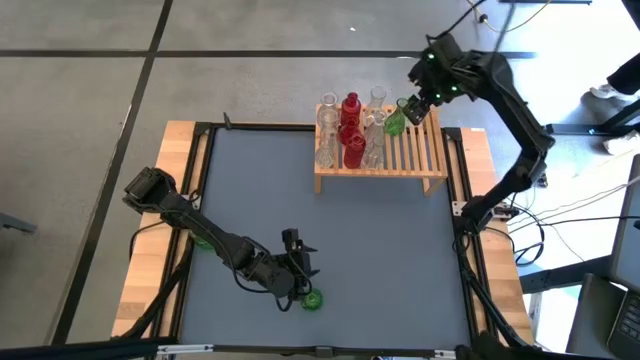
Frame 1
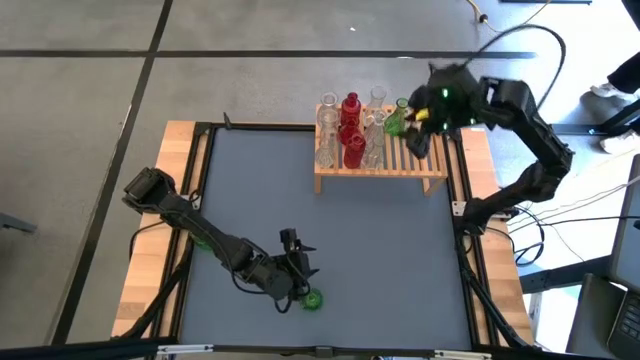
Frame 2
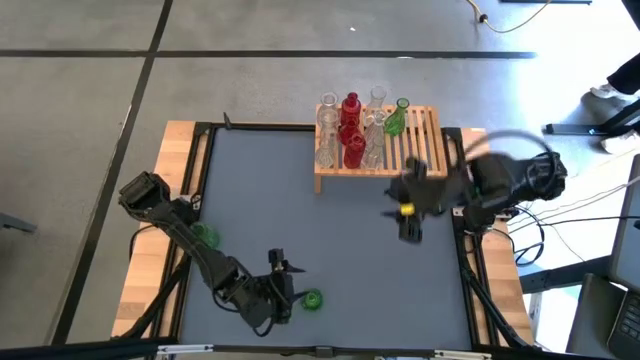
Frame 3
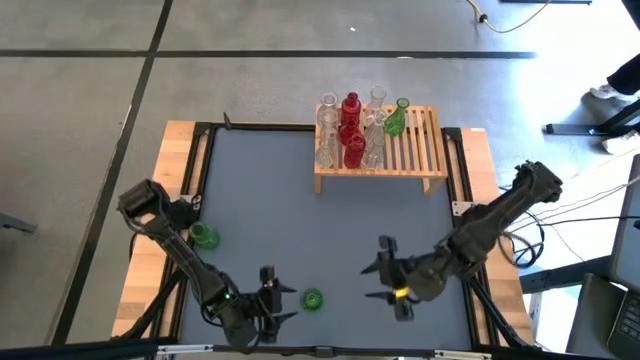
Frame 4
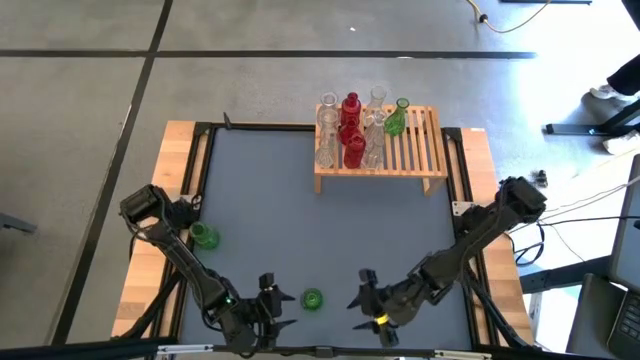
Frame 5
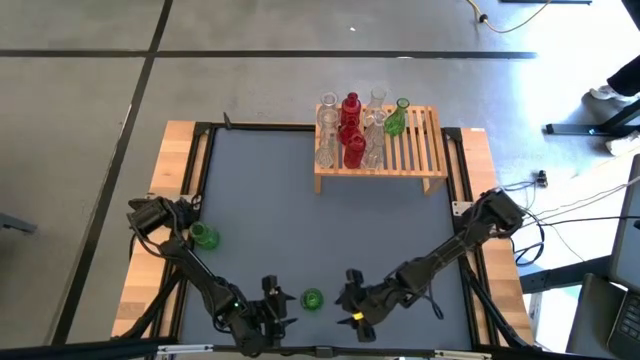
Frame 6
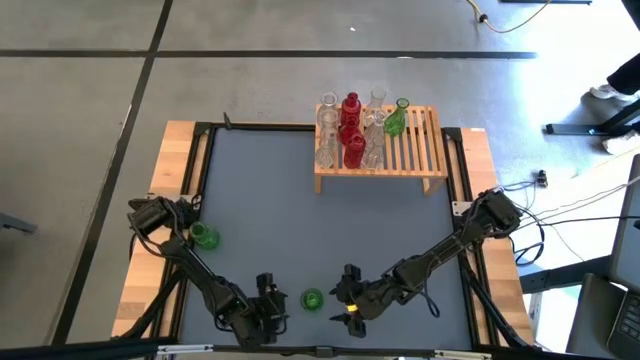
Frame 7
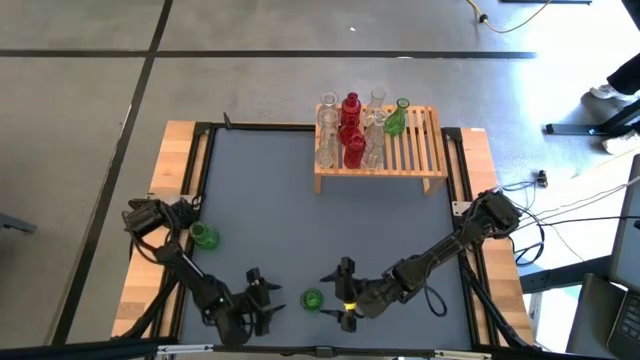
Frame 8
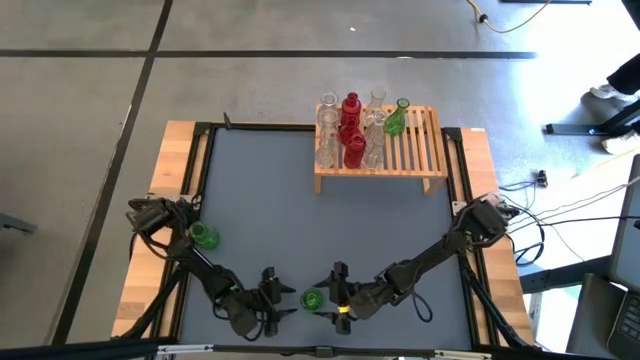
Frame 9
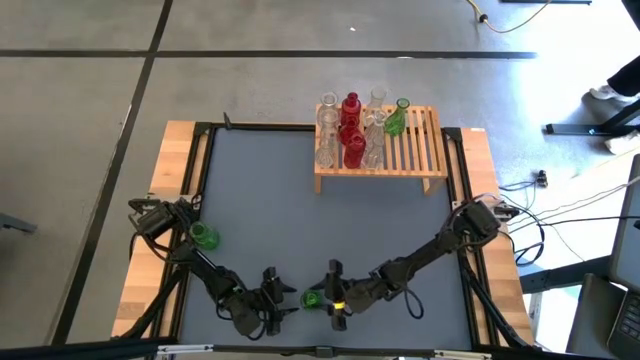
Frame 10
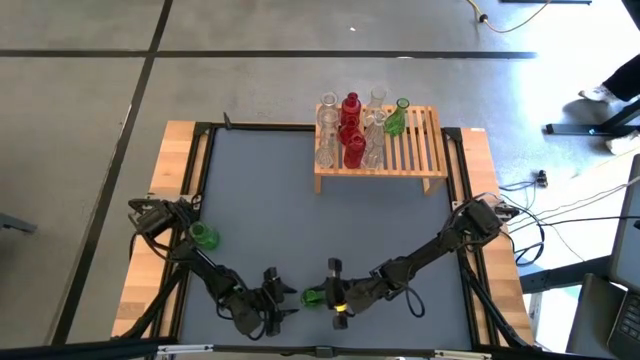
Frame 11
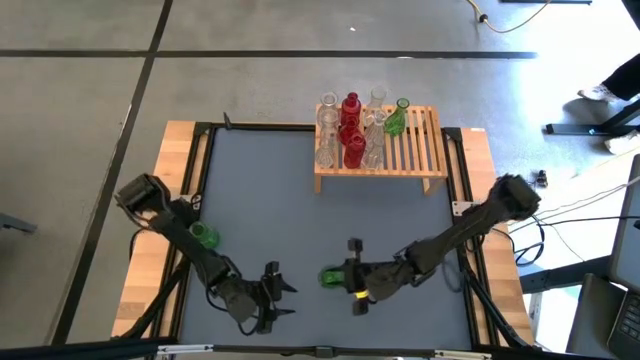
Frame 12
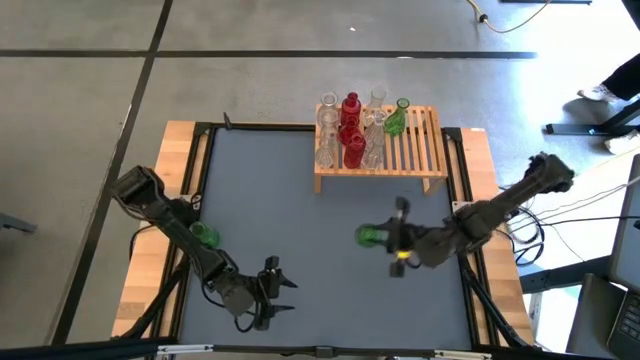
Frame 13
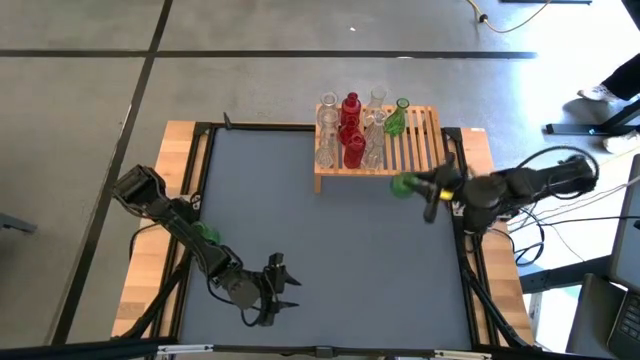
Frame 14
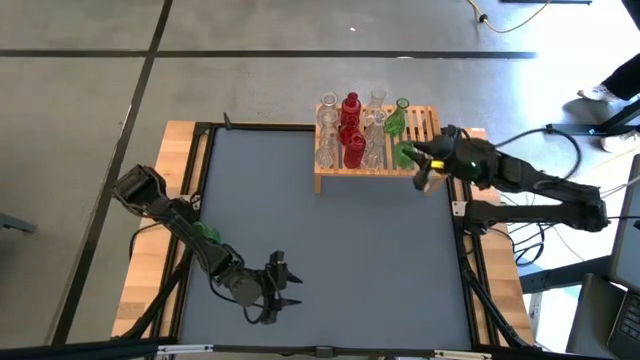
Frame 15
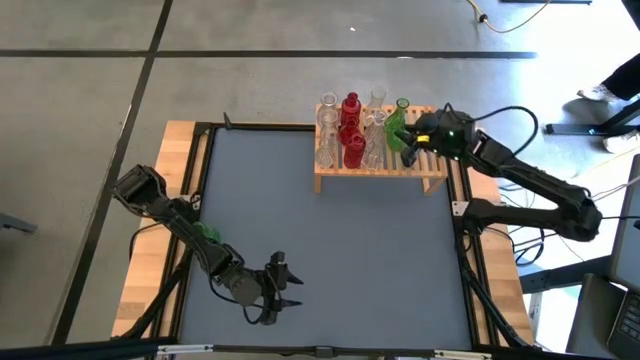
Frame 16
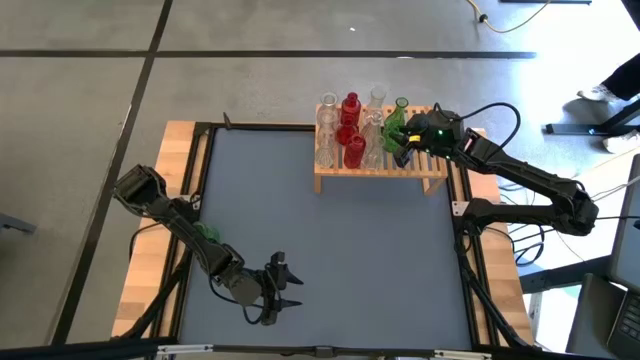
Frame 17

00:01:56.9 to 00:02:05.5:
Task: sort vases onto shelf
Put the bottom green vase onto the shelf aligned with the other green transparent vase

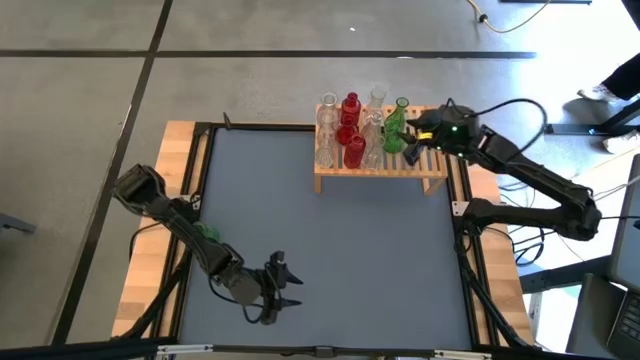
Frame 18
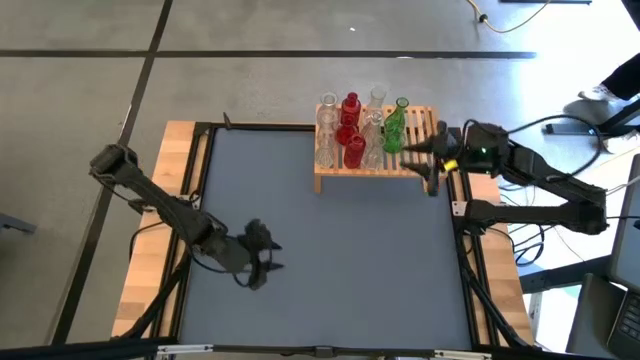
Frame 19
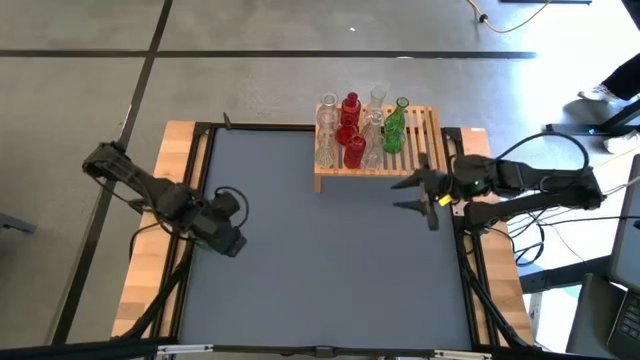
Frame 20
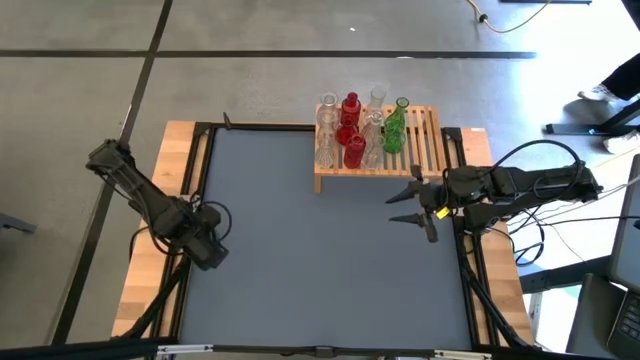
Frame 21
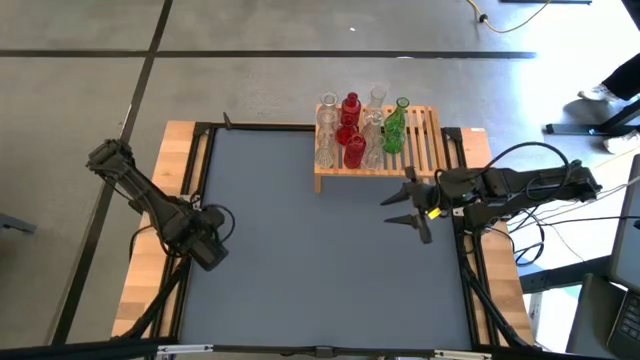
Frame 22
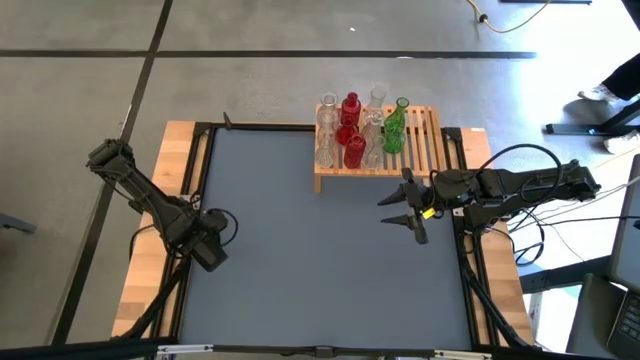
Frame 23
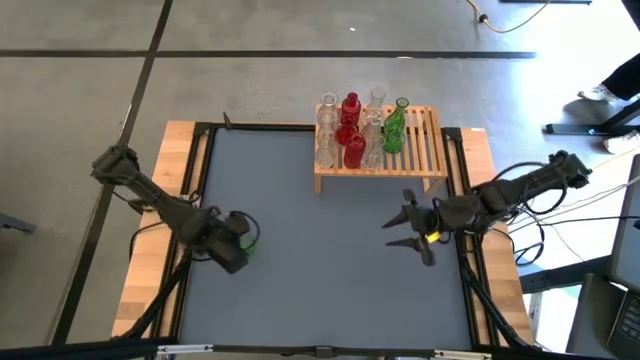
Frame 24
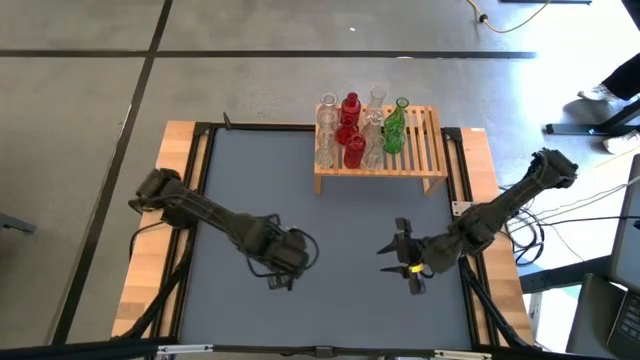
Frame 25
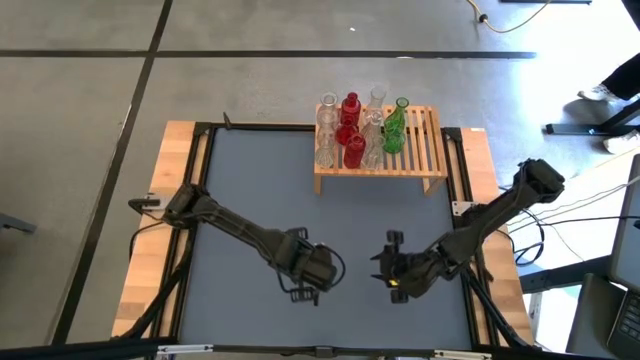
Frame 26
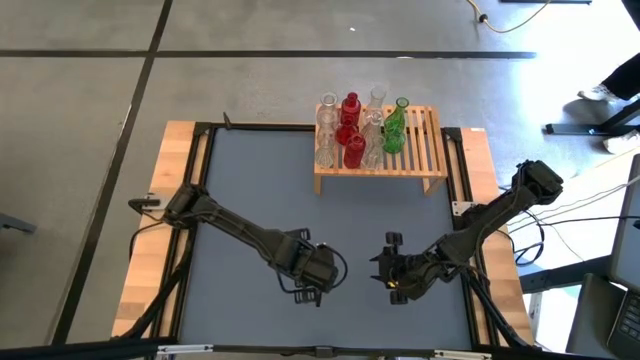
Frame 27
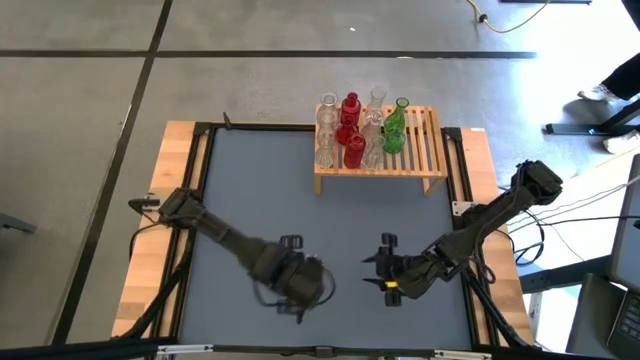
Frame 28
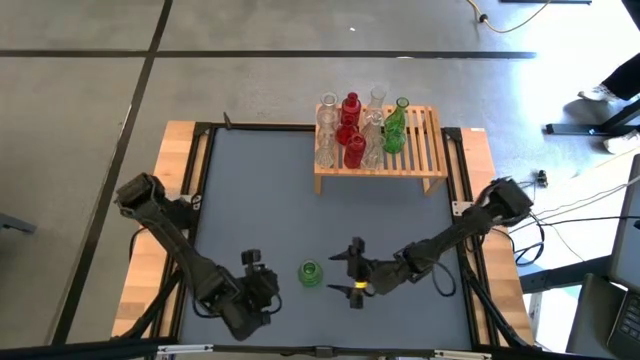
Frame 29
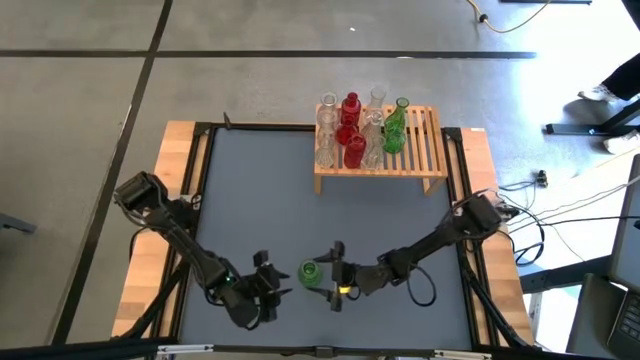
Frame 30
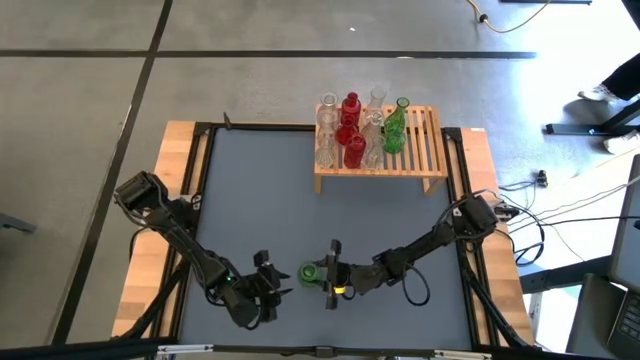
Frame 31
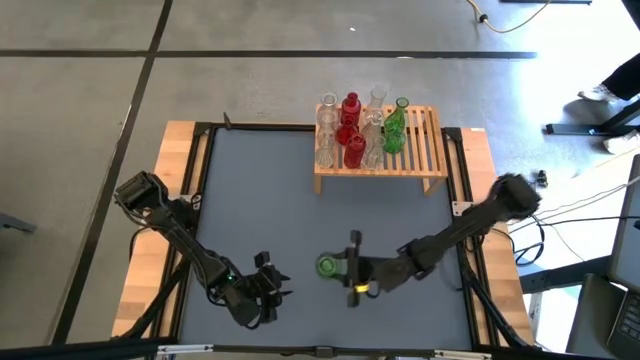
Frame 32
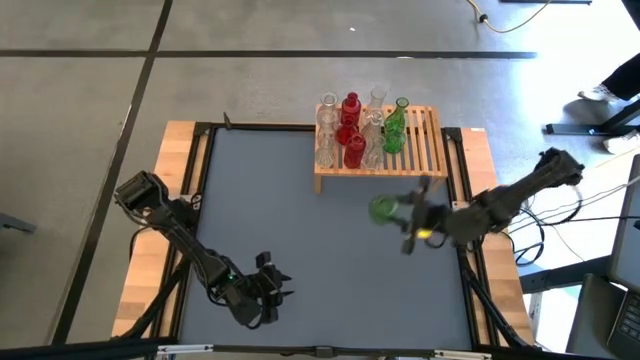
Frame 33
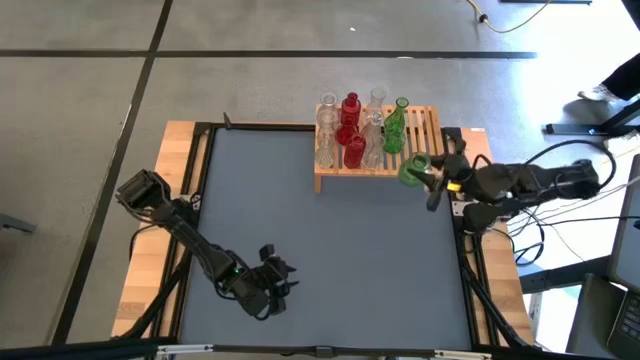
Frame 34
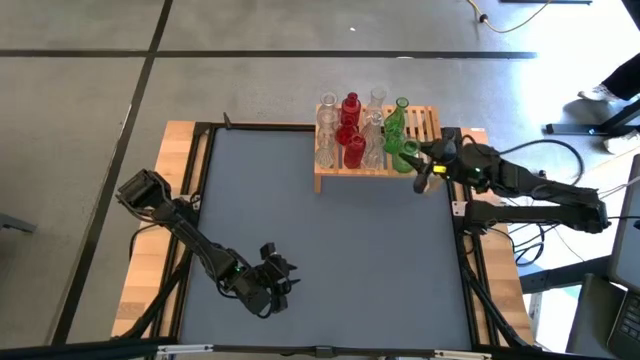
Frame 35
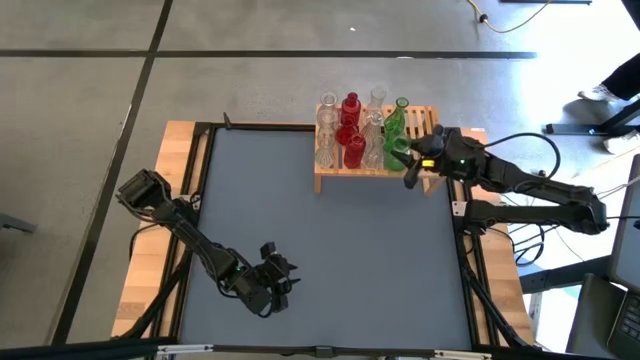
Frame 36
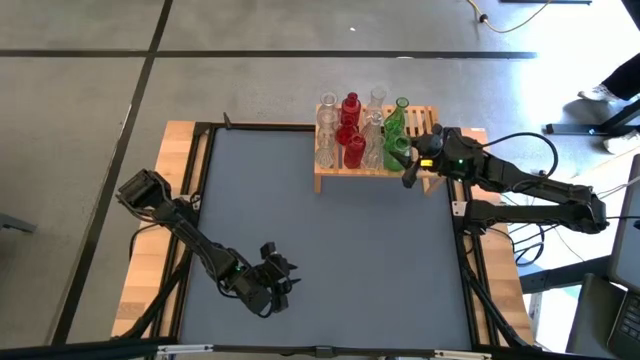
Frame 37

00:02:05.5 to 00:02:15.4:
Put the green vase onto the shelf aligned with the other green transparent vase

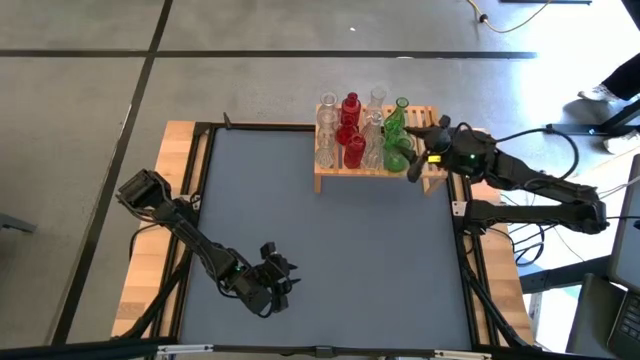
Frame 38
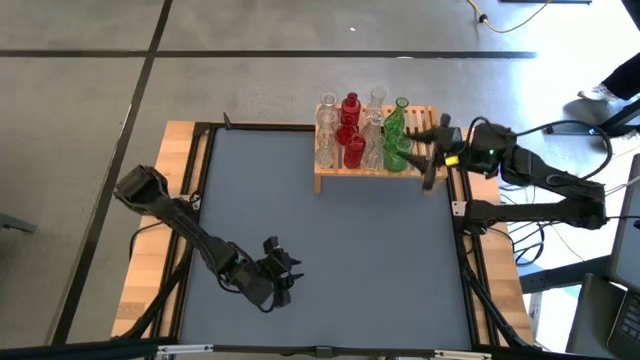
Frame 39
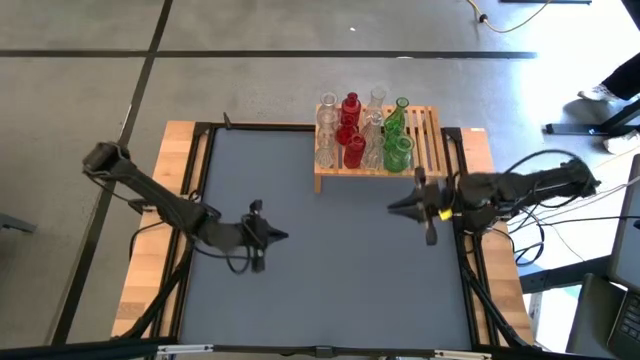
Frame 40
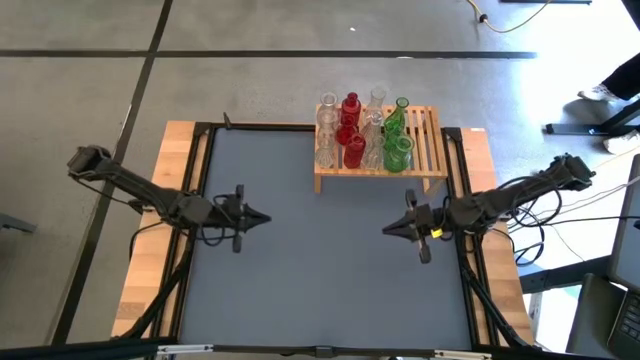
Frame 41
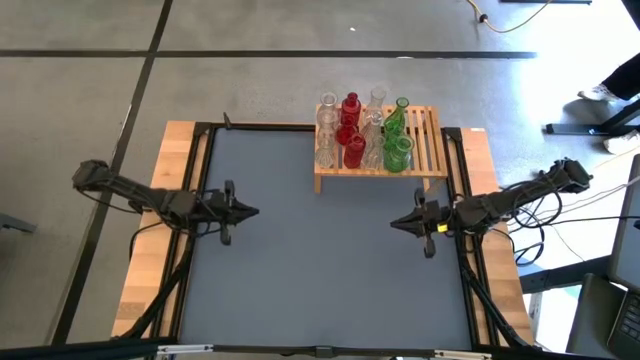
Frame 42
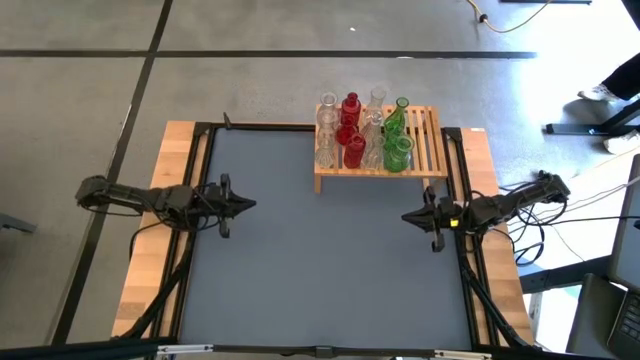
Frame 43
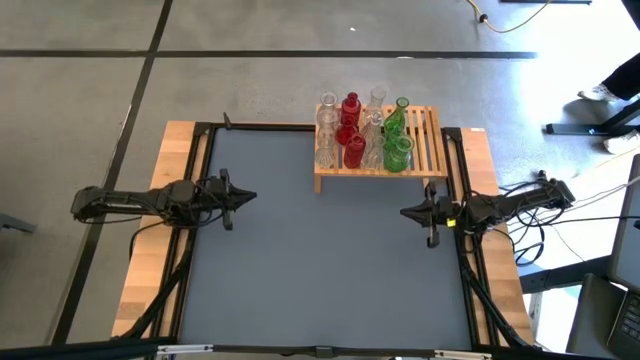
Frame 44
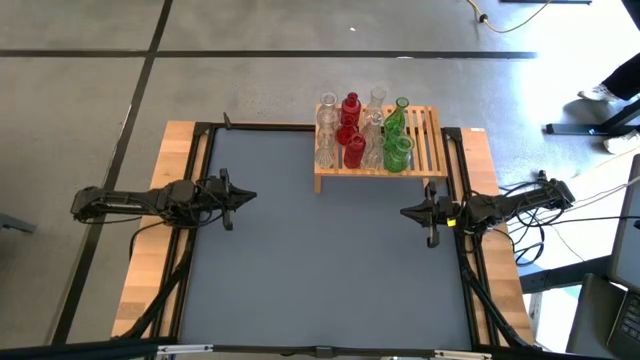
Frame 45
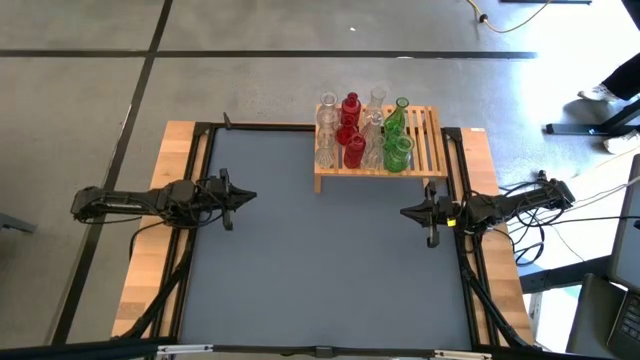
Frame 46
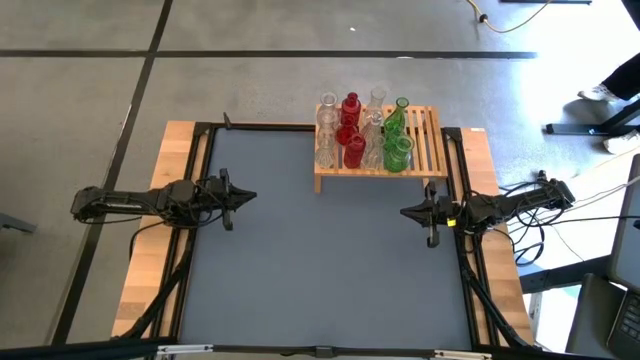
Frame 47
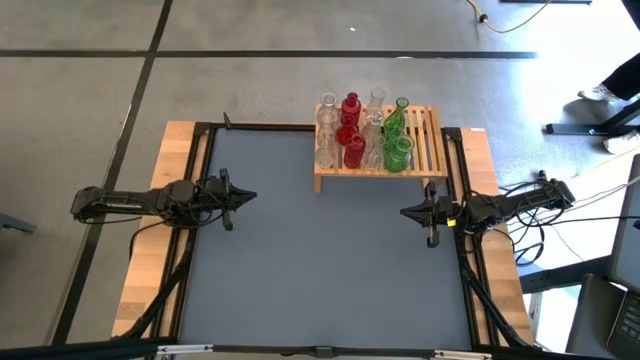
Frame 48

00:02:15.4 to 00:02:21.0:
Return to Home Position
